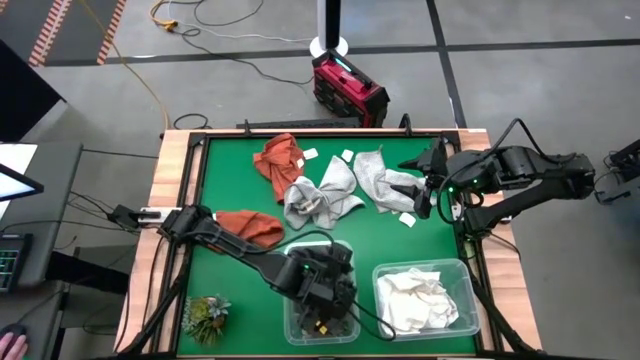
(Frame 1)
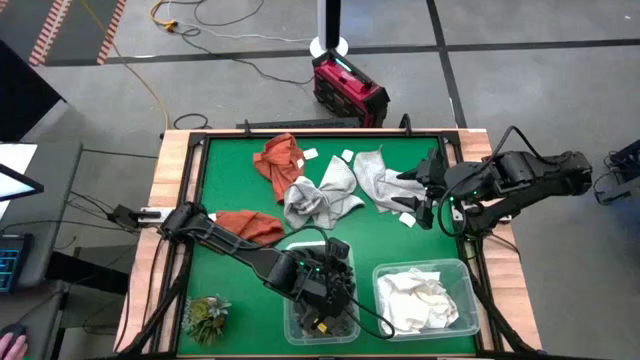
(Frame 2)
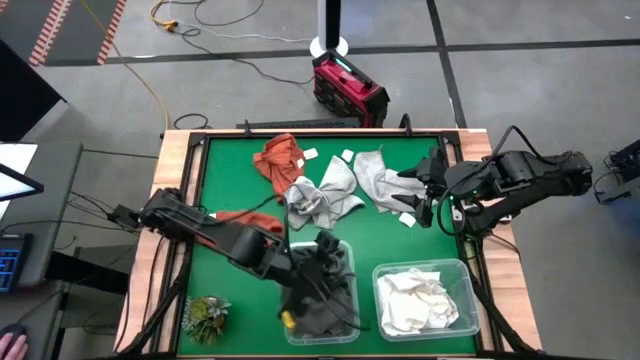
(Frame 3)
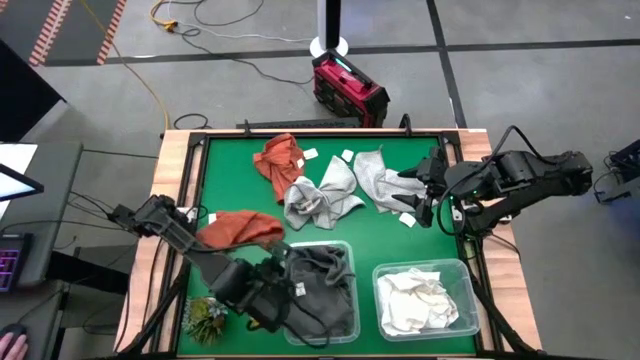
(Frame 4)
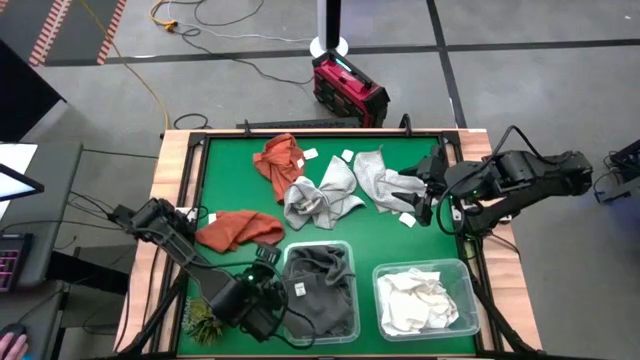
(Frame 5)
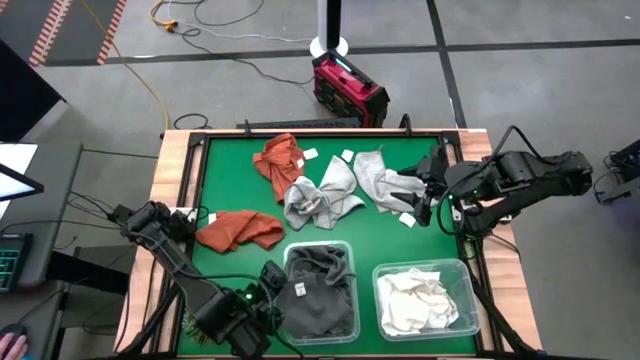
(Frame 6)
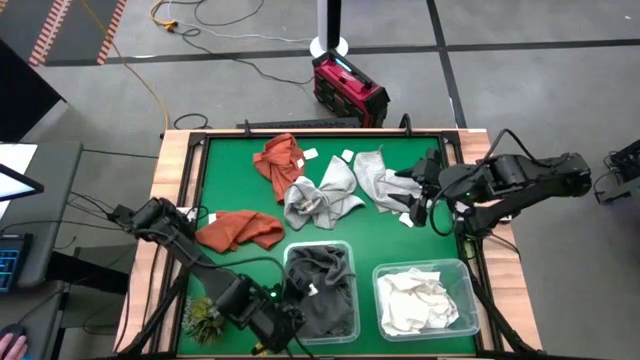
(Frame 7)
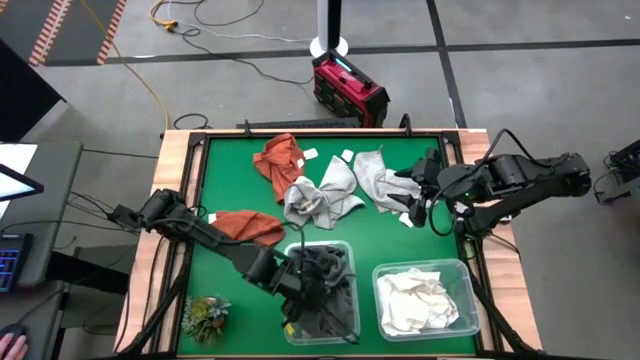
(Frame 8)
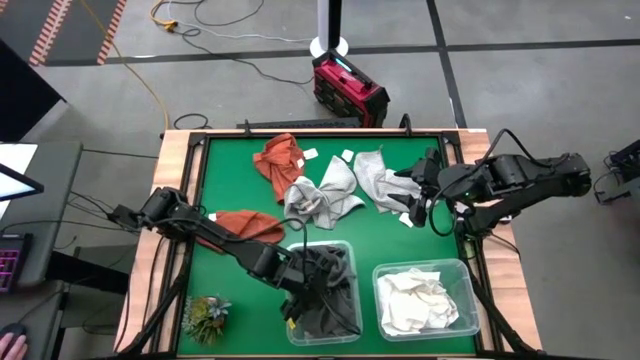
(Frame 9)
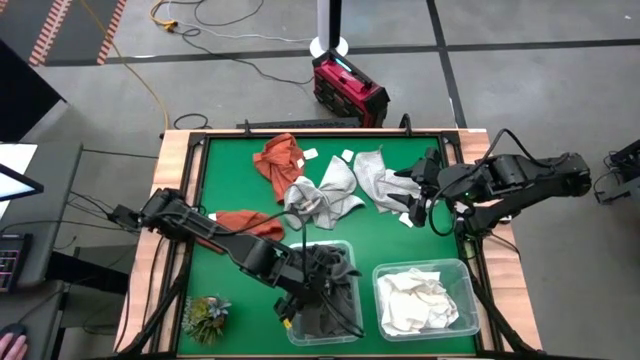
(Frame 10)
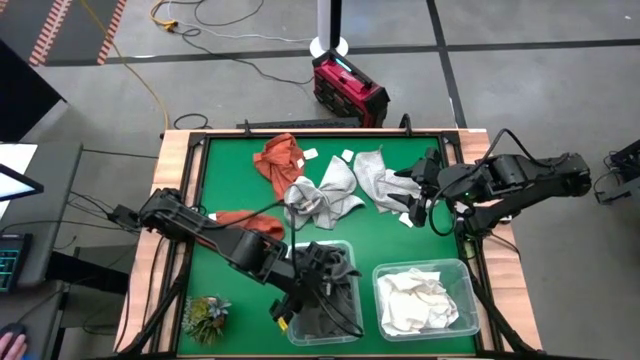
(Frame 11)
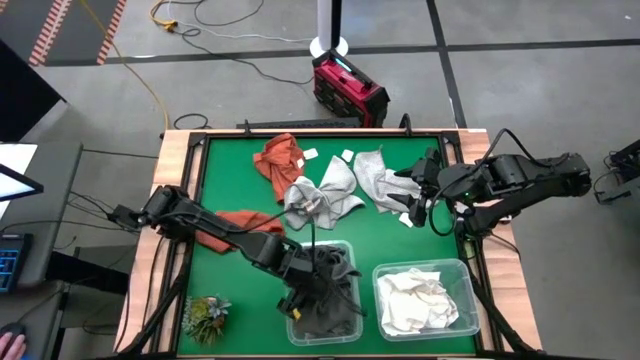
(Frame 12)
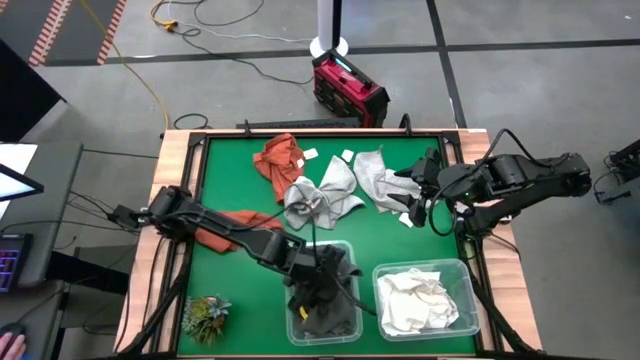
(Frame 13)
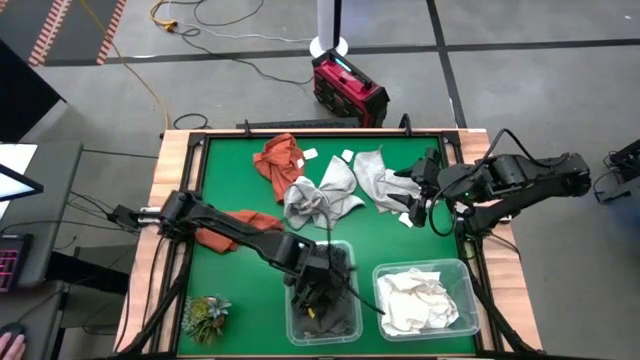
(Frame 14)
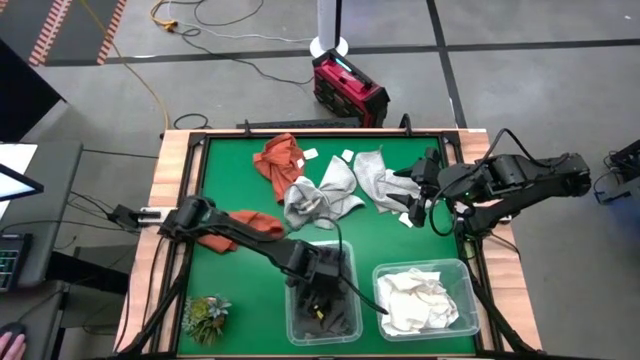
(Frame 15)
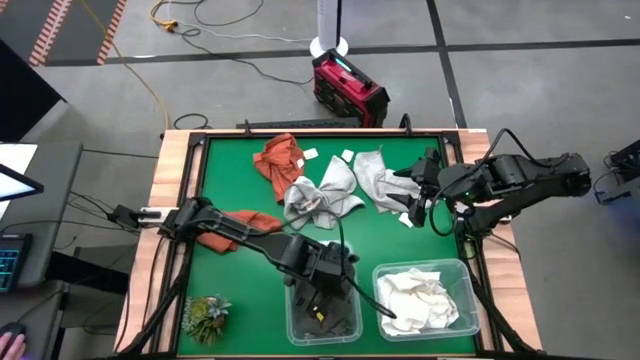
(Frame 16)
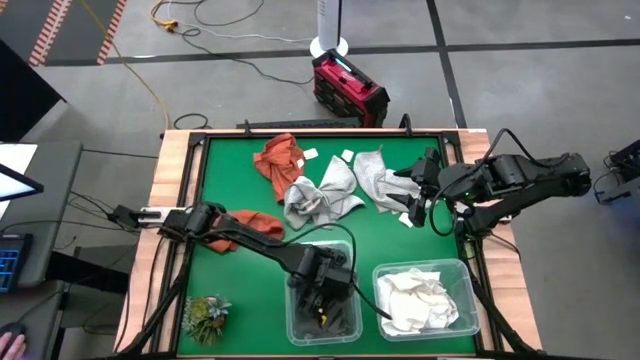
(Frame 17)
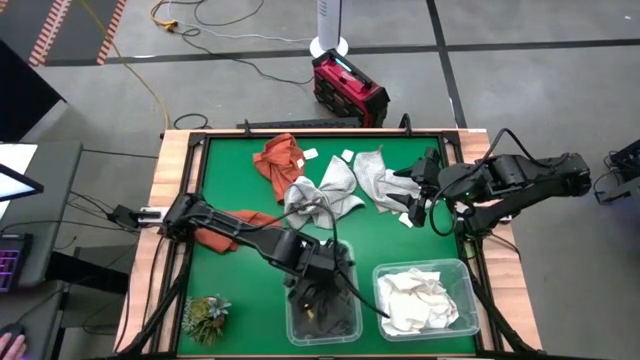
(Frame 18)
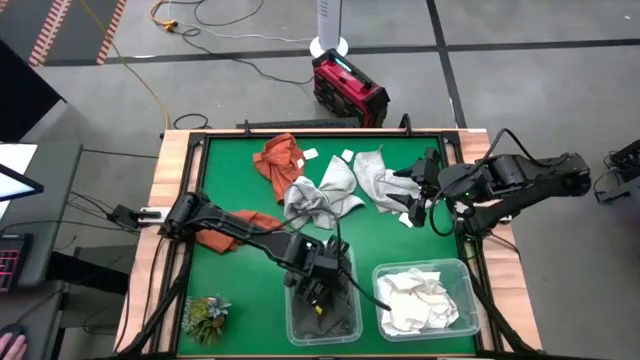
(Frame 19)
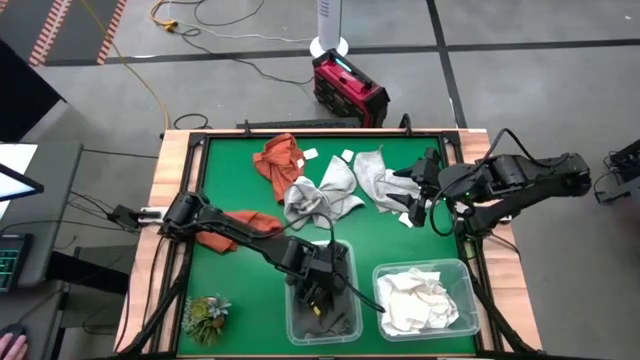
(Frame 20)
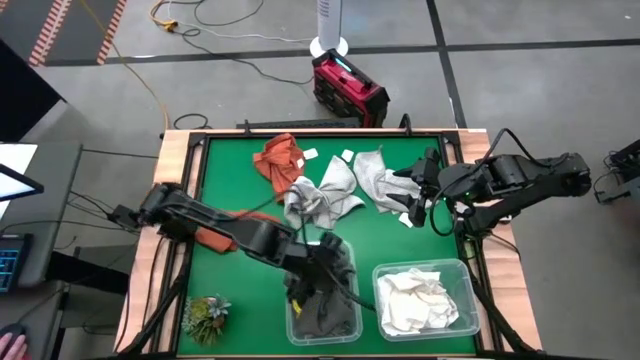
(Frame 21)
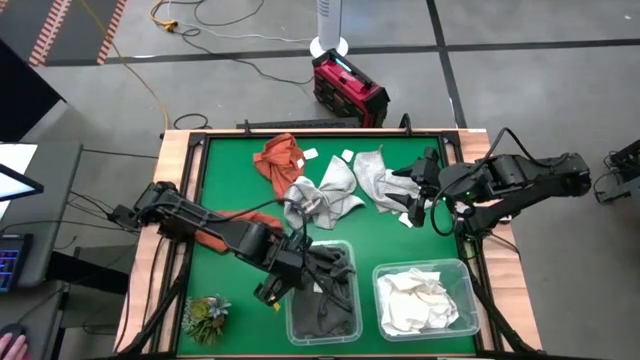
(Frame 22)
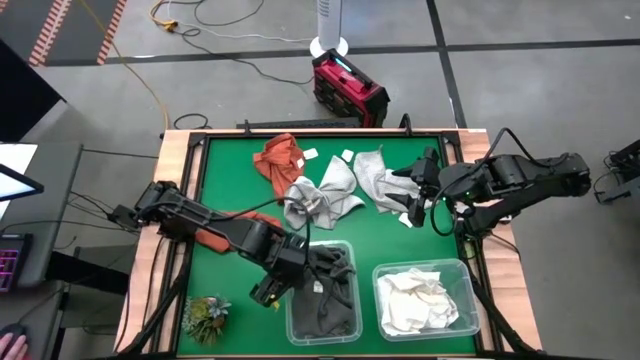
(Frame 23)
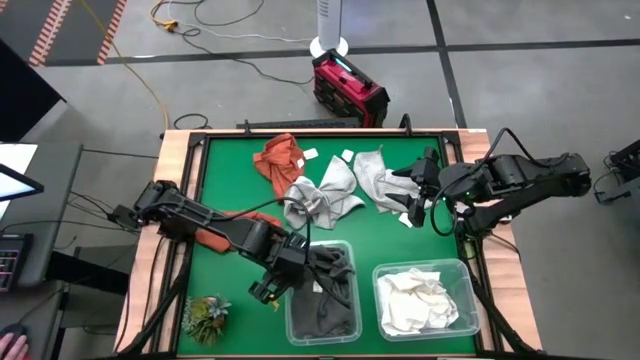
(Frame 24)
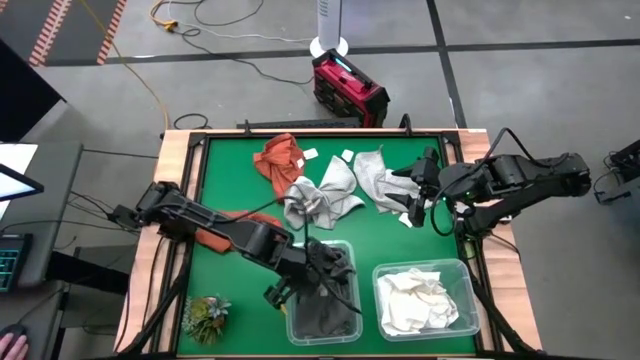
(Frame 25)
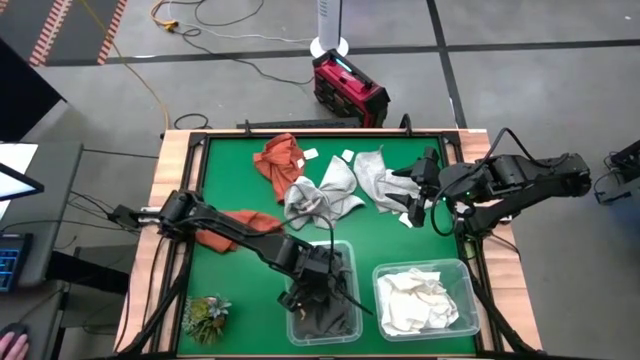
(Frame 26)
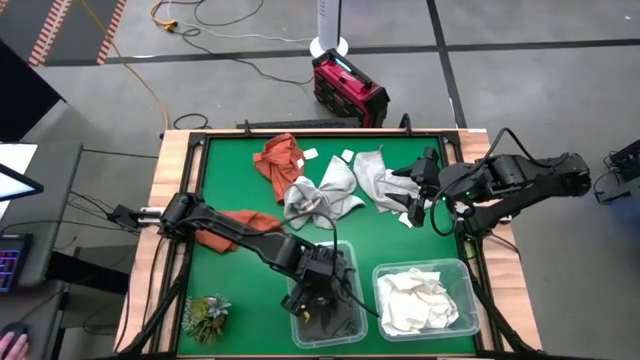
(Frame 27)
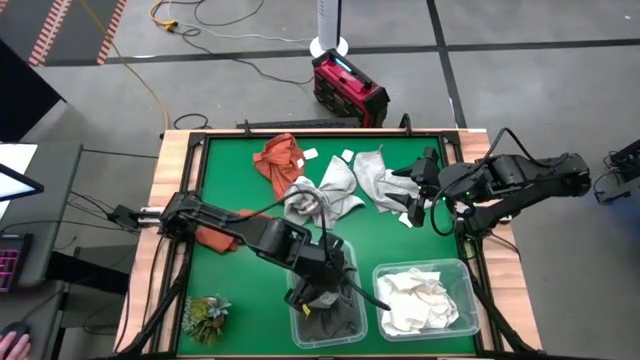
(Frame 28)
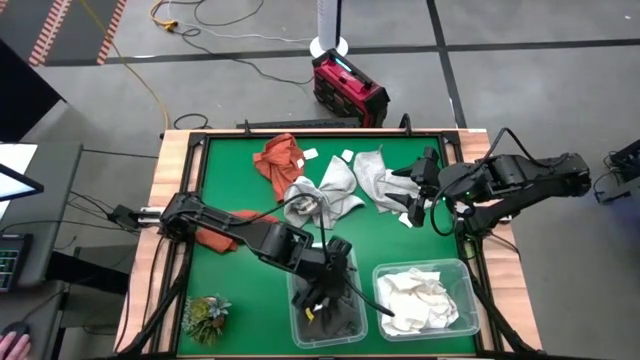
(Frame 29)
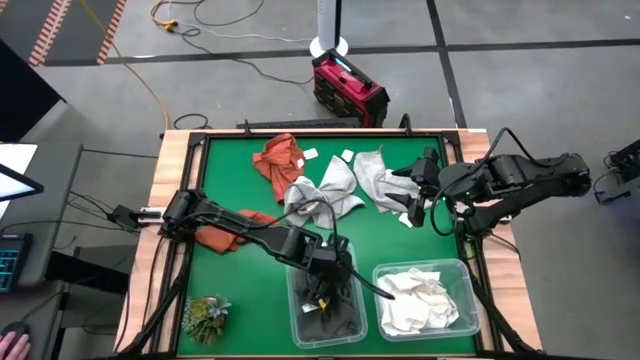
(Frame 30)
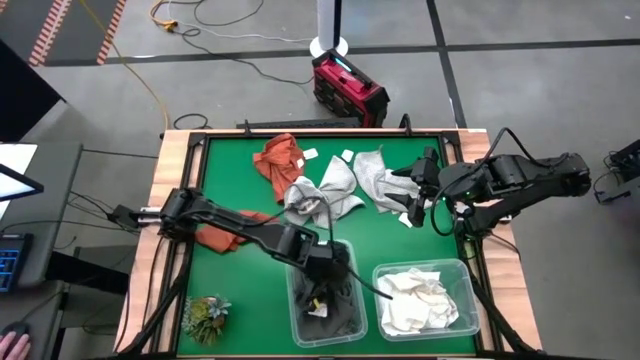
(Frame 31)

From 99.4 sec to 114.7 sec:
Task: Sort towels by color in basket
Put the dark grey towel into the left transparent bin

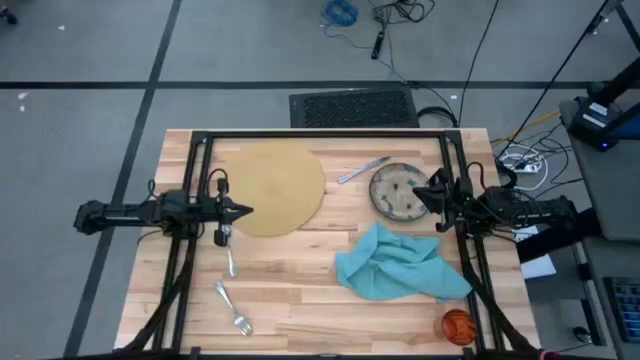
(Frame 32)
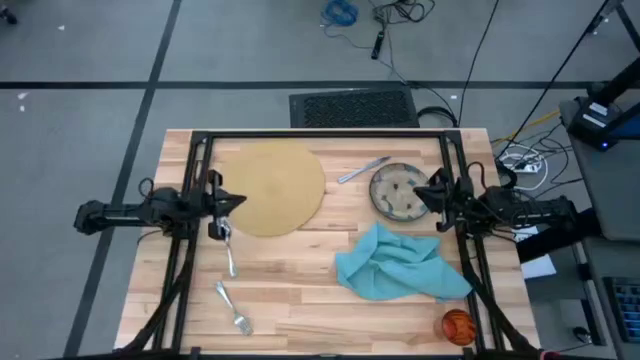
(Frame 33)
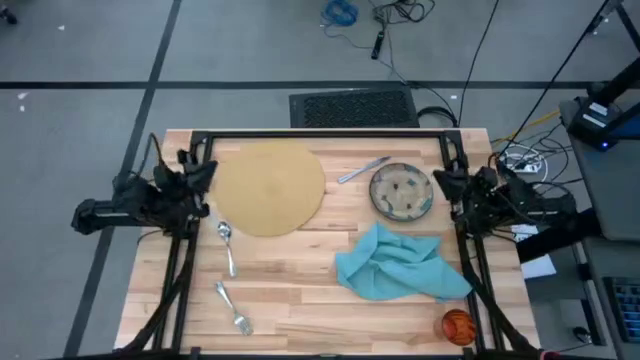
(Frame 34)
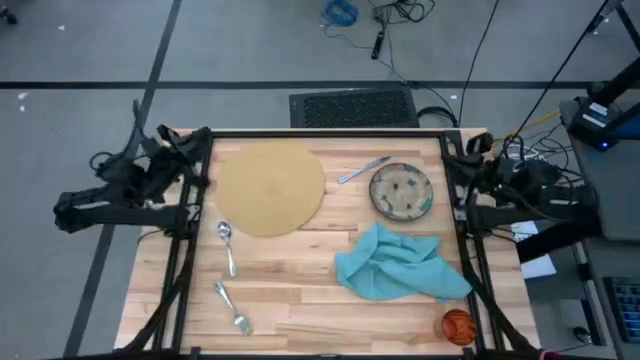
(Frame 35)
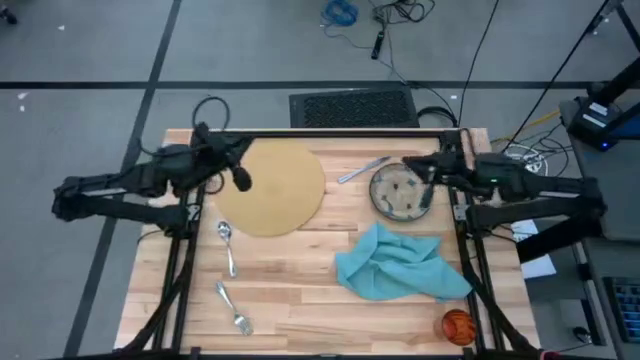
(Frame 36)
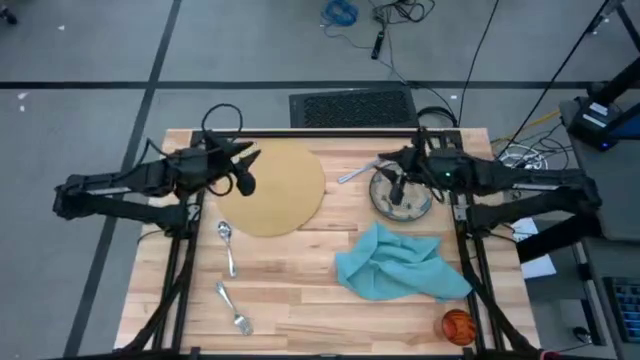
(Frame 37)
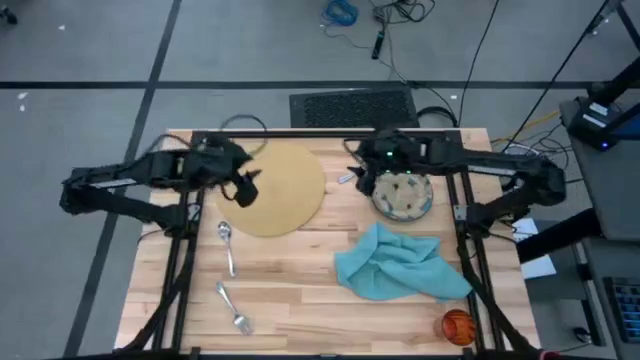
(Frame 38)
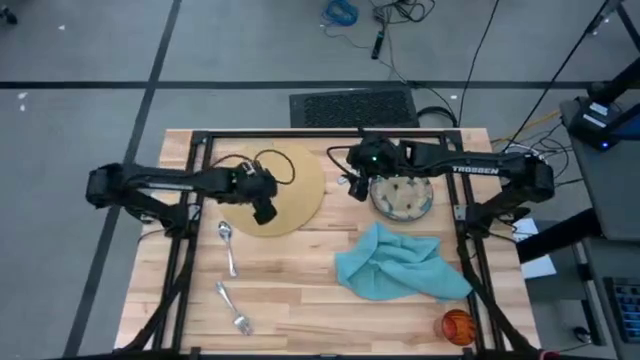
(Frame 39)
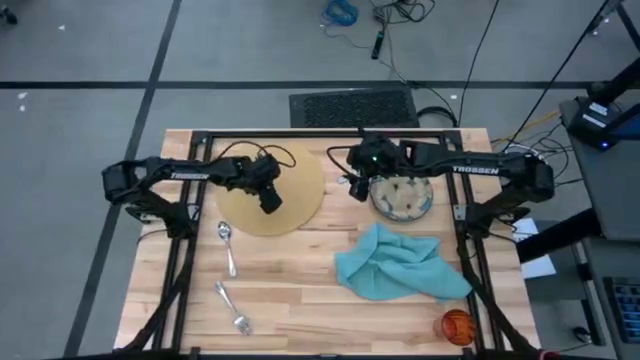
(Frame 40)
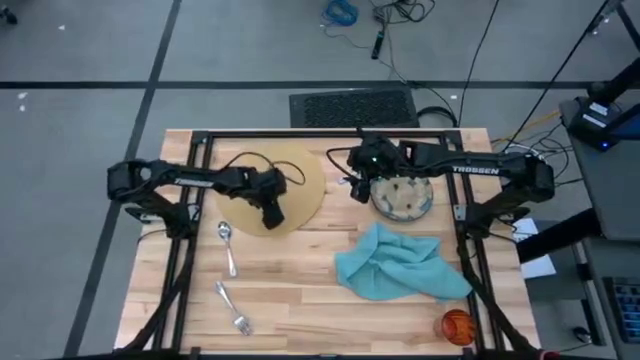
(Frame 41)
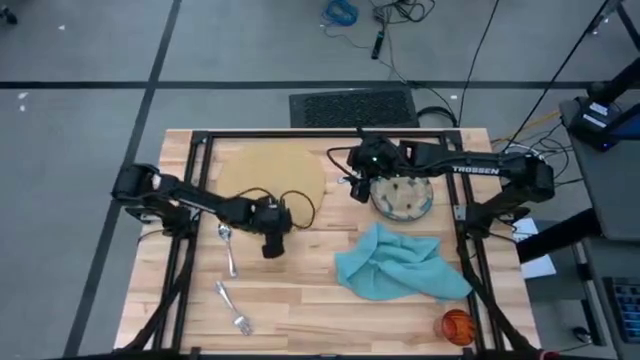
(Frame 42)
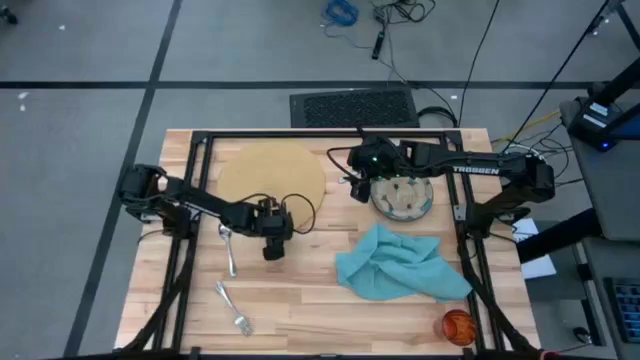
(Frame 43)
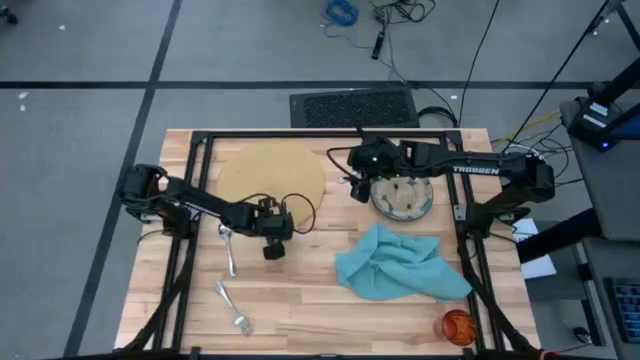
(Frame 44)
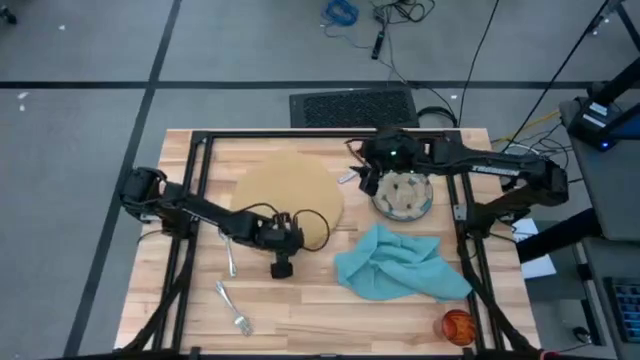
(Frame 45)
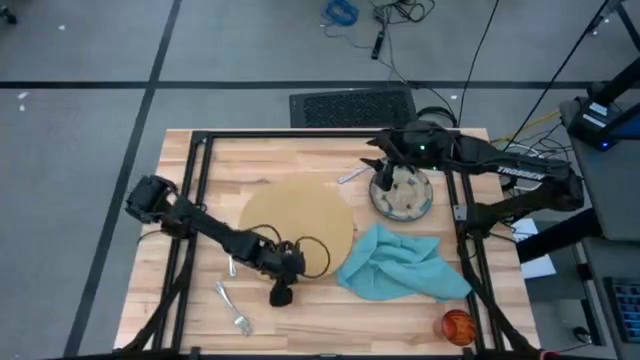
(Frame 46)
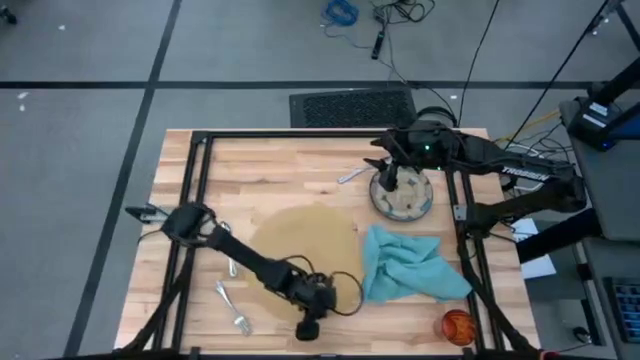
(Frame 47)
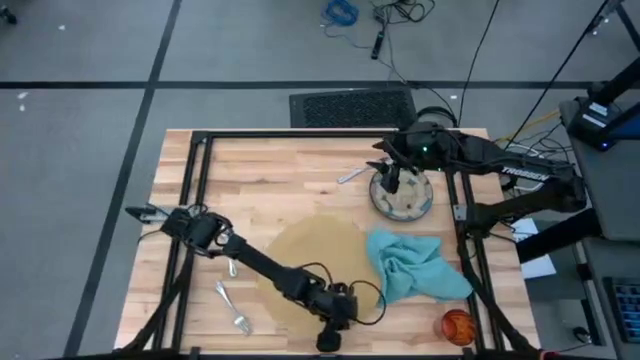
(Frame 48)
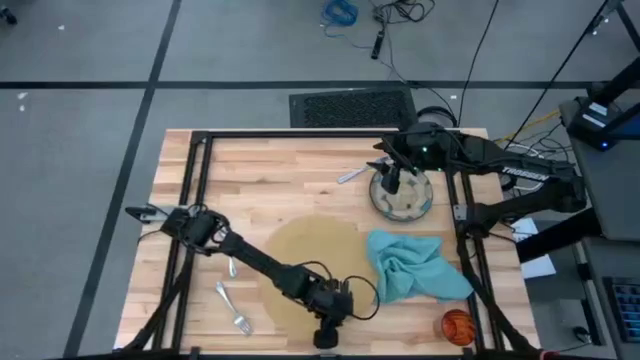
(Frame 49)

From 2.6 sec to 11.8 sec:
Task: Set table place
Move the brown mat to the center of the table
